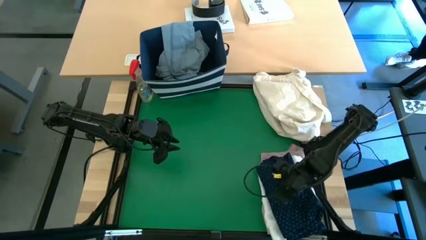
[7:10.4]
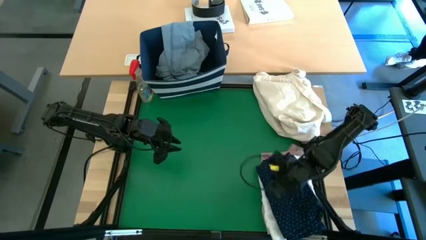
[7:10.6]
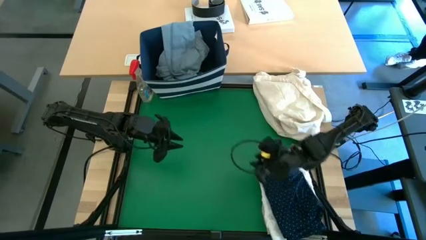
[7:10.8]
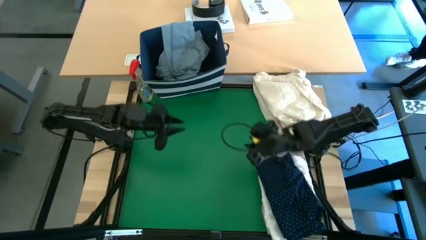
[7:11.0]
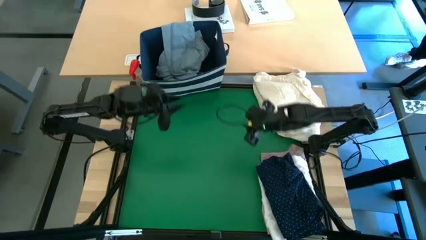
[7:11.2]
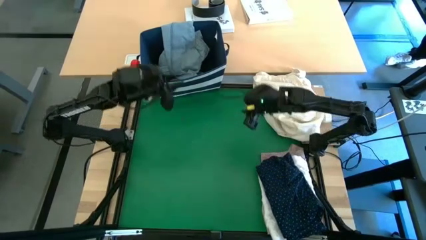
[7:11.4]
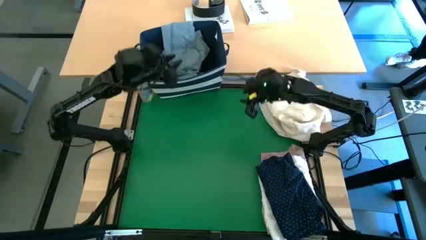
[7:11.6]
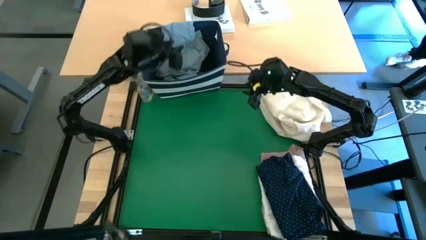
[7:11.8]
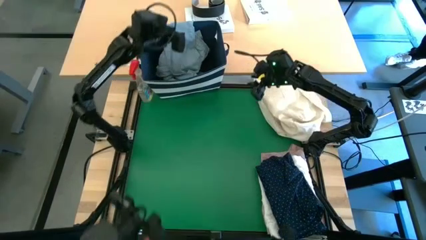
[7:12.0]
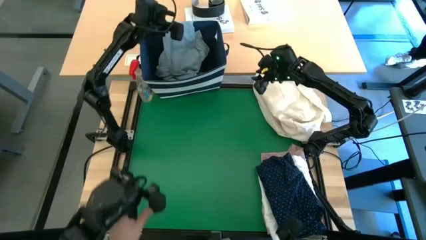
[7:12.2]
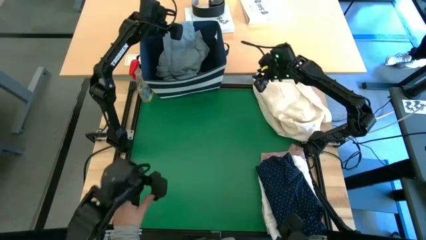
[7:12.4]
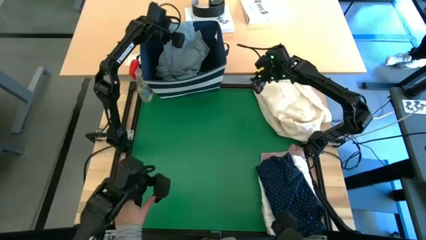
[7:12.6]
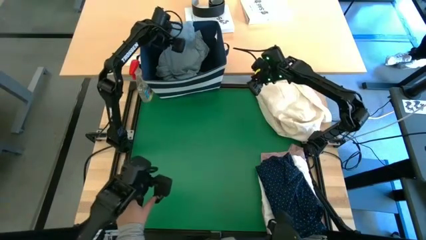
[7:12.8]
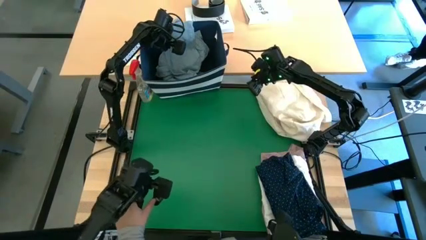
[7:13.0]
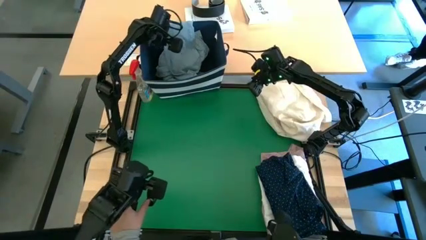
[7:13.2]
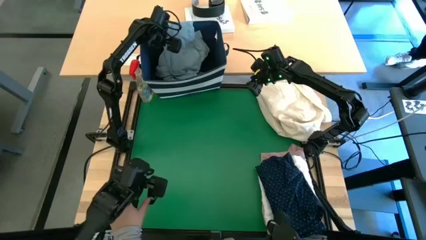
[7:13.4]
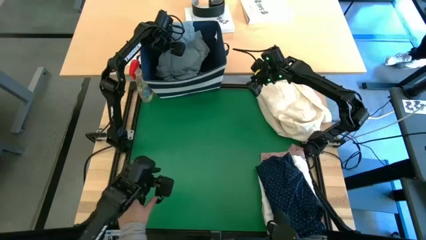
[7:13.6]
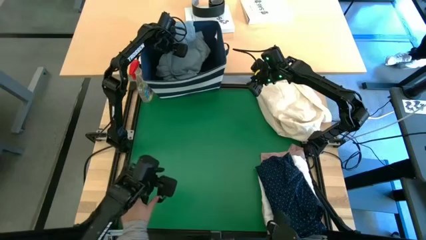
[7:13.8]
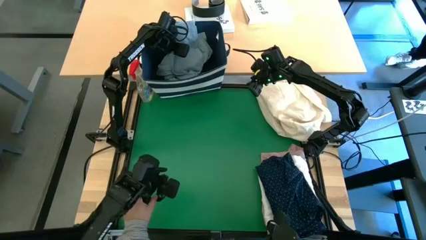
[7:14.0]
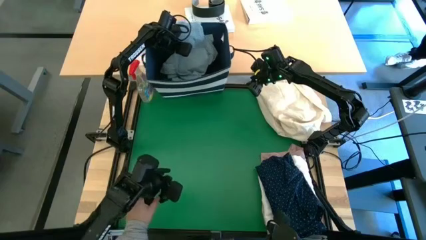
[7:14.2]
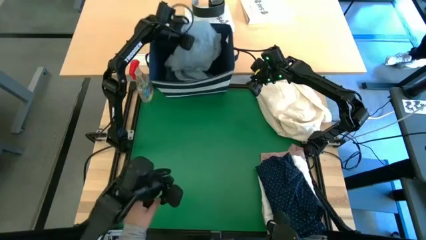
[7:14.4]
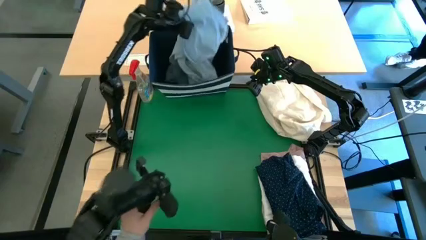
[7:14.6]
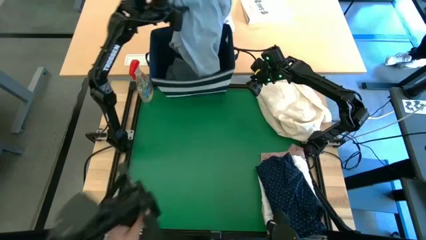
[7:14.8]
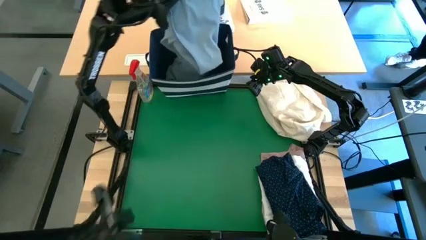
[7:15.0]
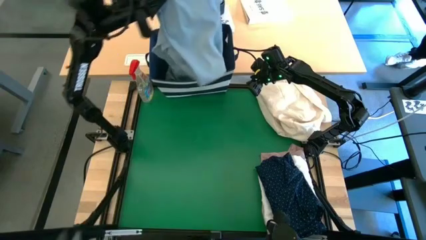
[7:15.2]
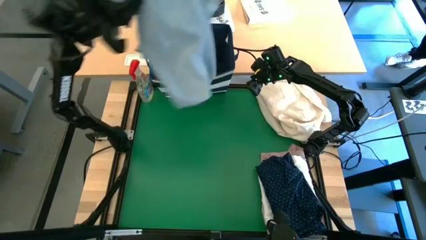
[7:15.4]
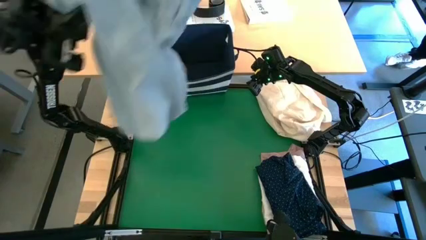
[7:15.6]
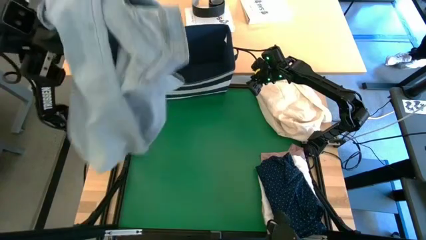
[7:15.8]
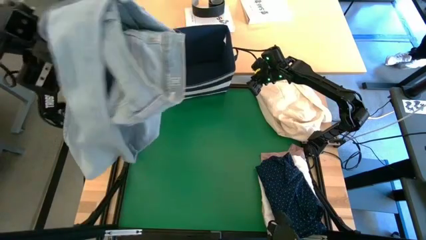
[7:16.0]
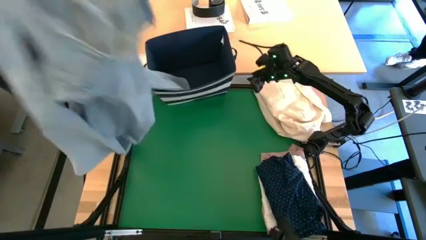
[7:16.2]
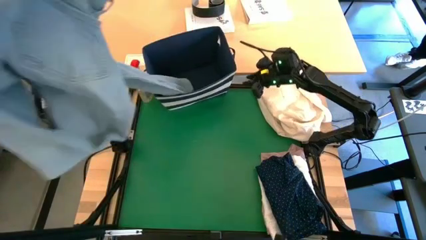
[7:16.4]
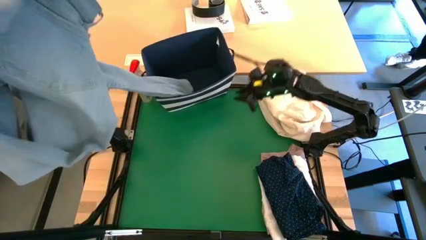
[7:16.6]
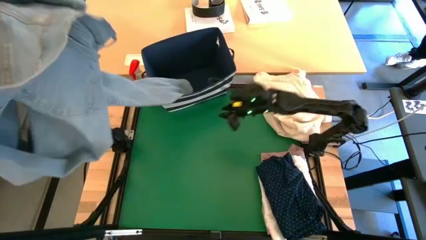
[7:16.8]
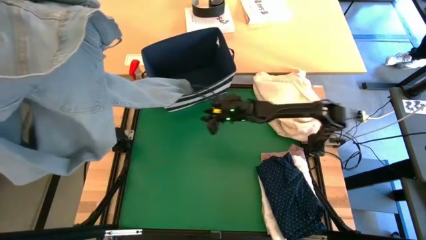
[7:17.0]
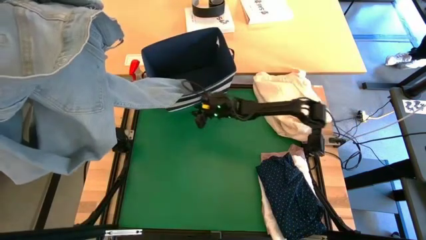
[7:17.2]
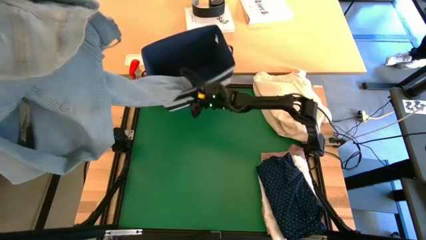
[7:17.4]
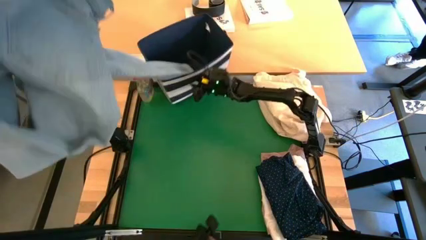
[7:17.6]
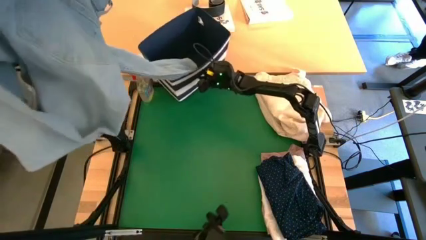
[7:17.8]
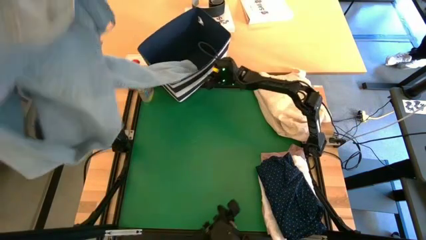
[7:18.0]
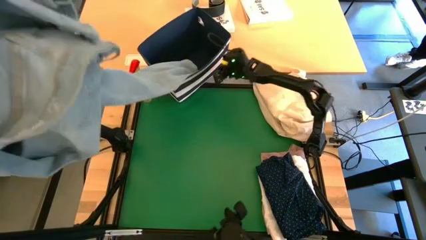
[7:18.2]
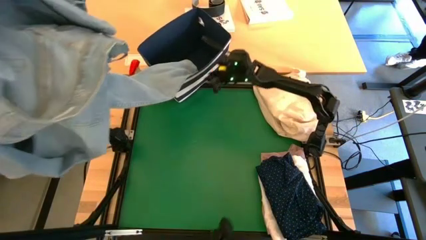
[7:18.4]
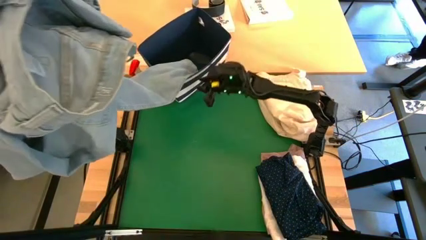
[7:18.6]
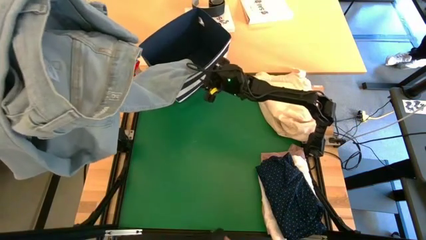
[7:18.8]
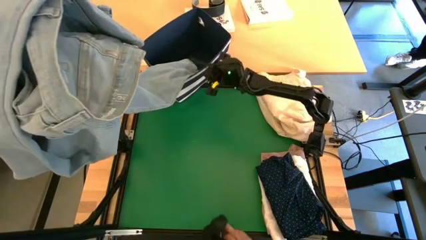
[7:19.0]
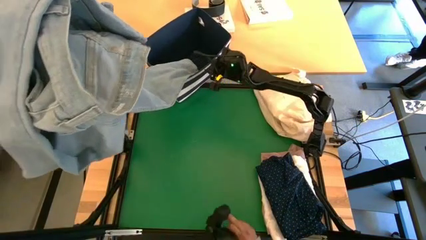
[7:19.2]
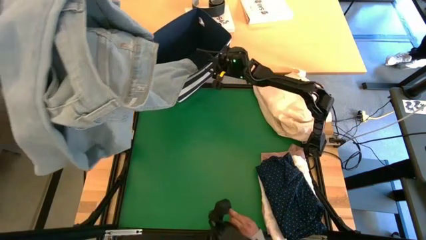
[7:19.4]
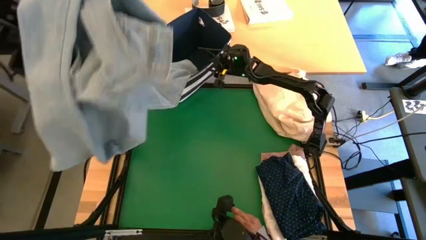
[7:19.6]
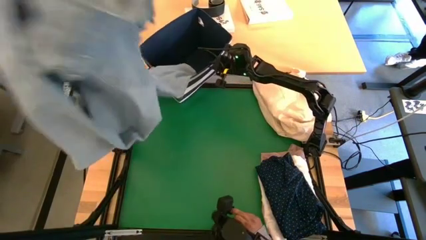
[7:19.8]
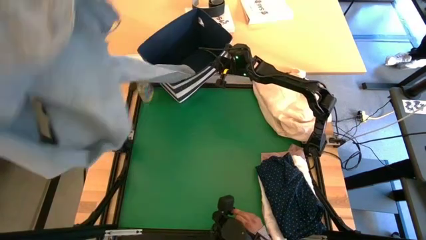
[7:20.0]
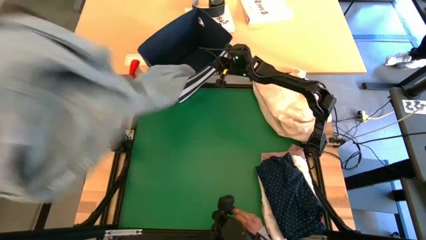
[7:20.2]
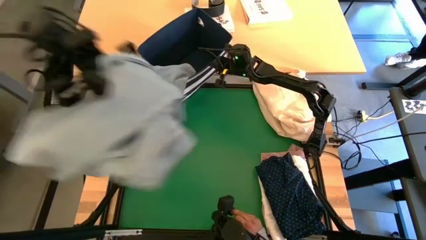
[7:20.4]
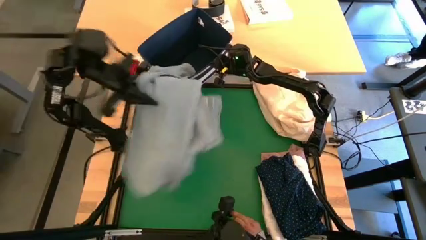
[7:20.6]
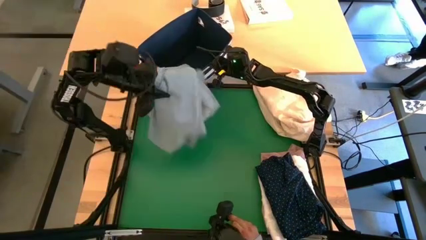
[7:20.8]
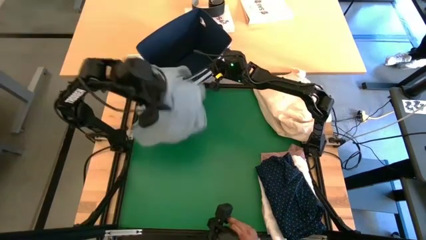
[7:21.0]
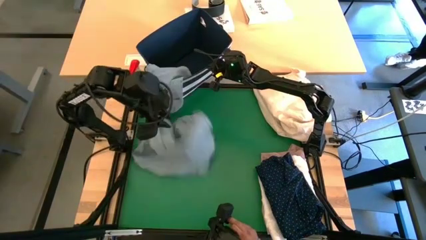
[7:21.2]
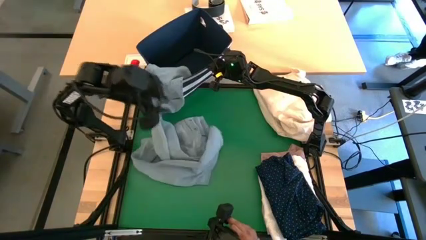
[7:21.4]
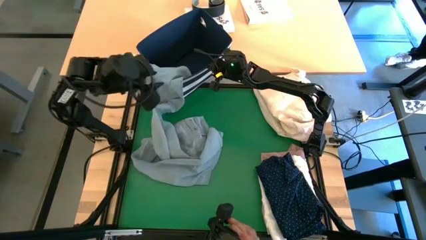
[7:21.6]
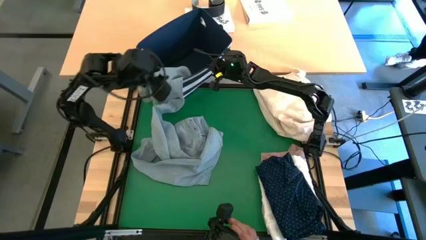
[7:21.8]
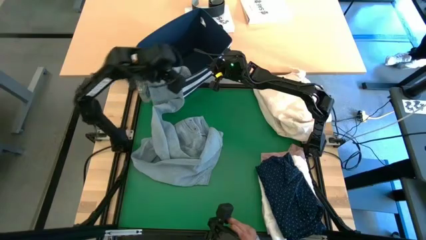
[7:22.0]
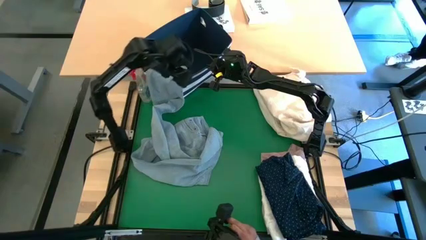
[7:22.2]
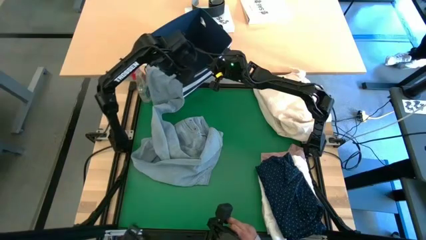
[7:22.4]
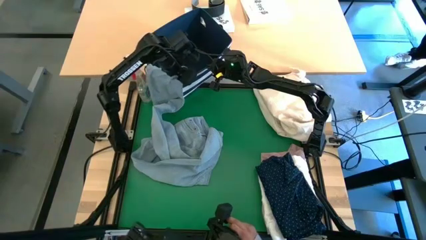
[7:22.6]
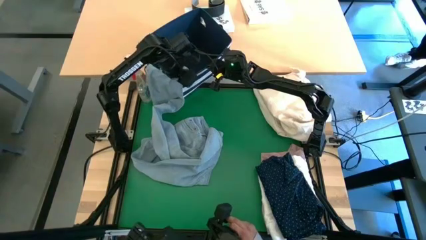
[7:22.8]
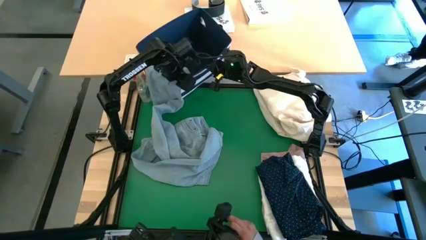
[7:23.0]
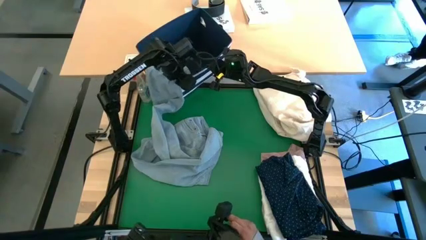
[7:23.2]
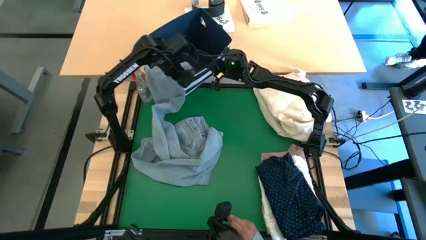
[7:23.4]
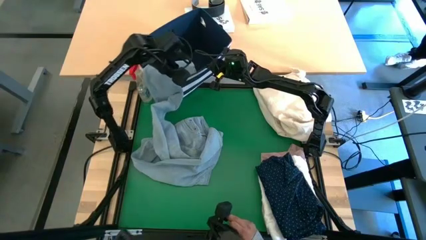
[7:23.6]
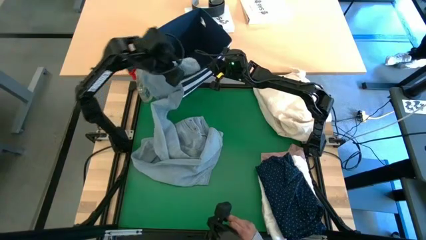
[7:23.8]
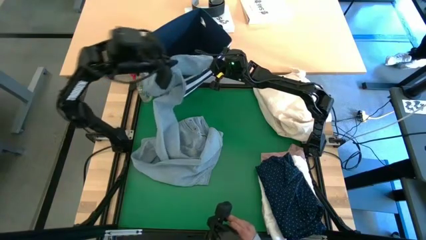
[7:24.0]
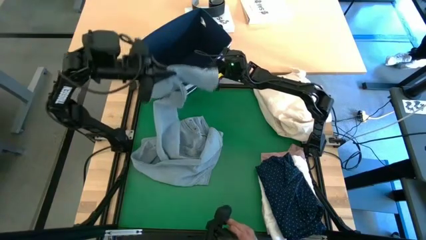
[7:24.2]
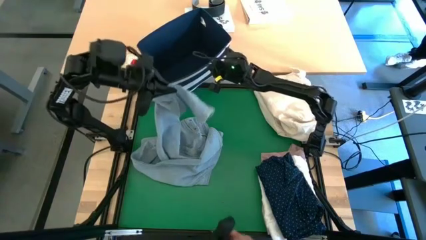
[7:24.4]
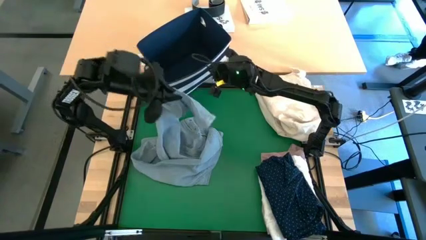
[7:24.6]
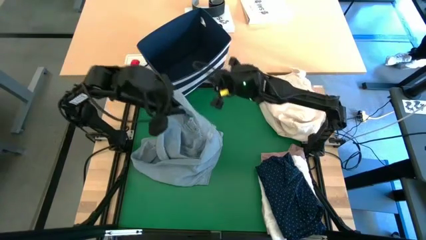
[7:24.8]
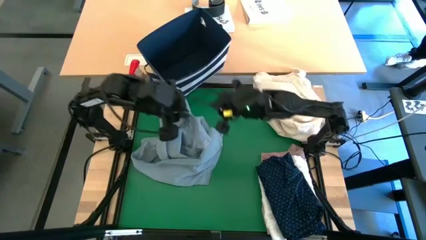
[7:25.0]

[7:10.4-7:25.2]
Task: Fold laundry
Remove the blue jeans from the blue laundry bin

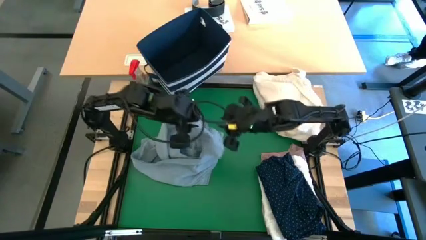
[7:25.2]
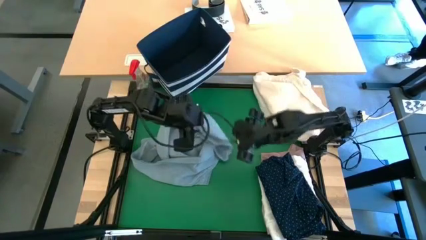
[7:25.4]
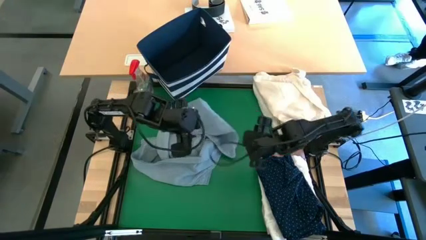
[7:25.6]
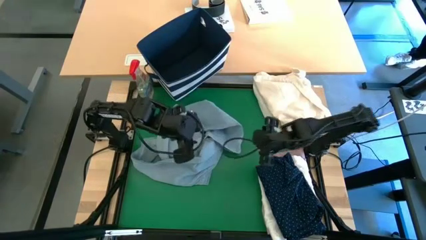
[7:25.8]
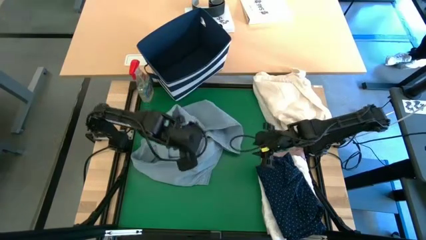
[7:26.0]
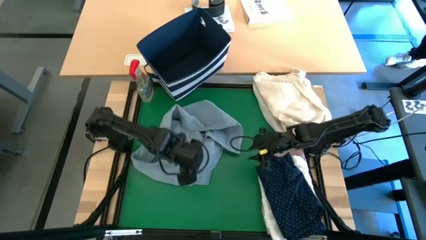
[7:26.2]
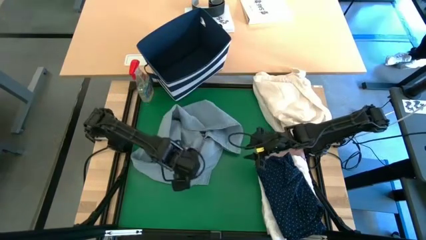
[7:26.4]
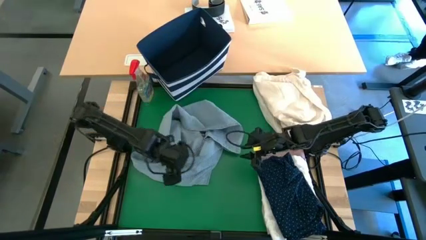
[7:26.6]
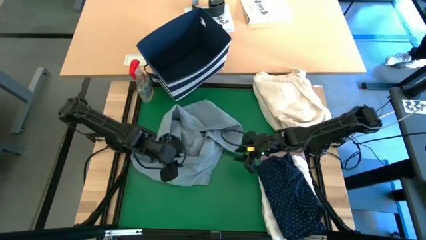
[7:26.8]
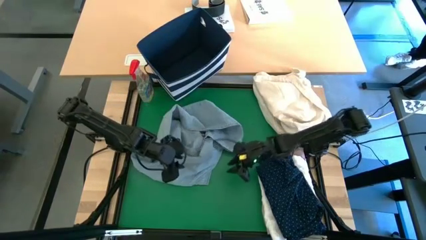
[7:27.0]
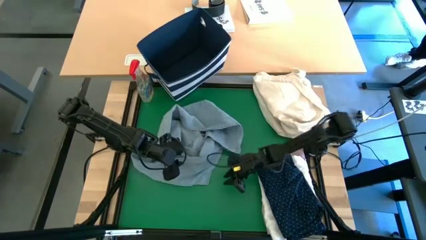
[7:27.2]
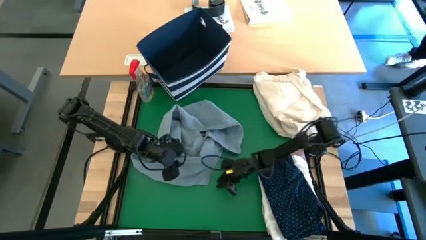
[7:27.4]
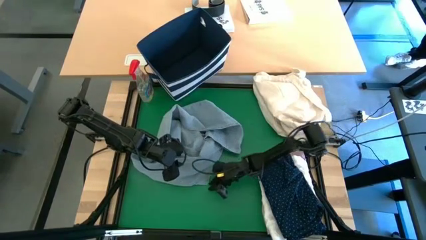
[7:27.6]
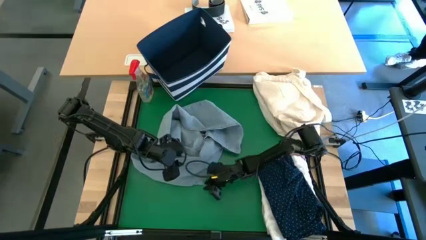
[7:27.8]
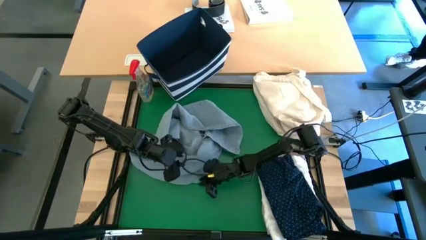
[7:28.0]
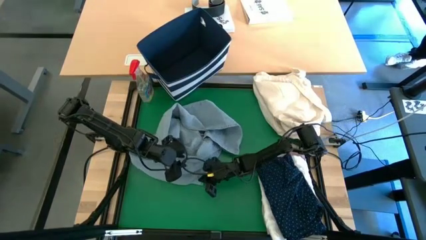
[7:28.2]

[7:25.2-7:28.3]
Fold the blue jeans

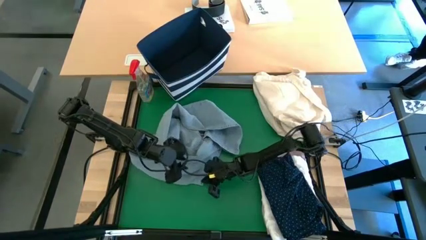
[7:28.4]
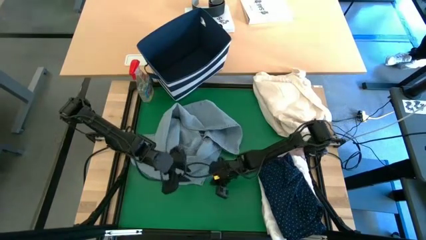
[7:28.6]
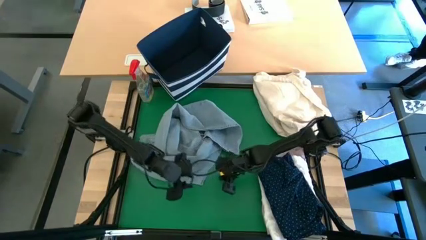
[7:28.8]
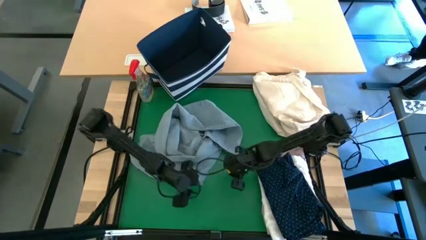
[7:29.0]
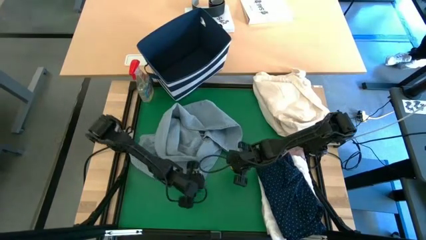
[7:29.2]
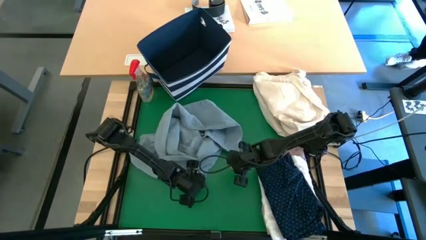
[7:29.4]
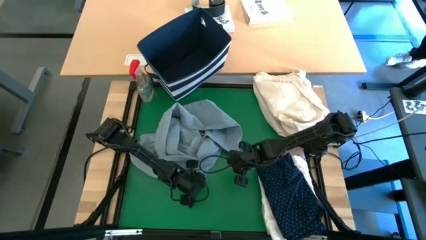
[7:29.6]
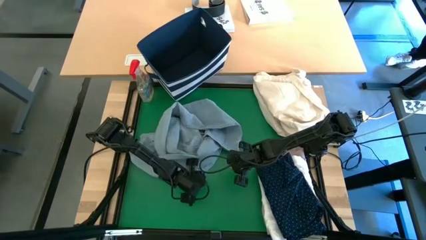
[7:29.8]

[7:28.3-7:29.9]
Fold the blue jeans
